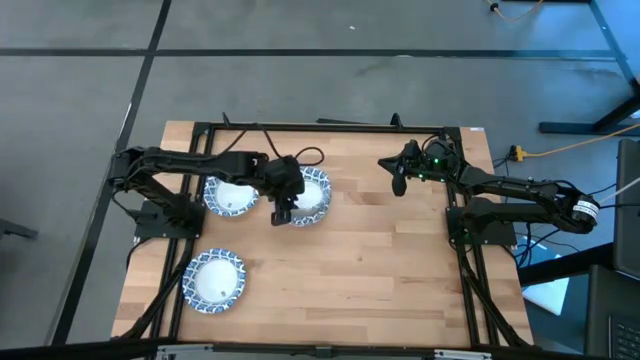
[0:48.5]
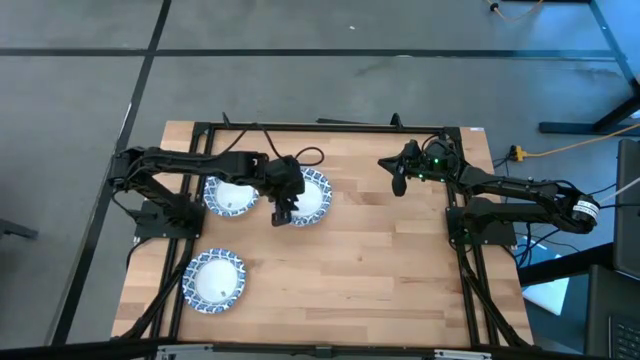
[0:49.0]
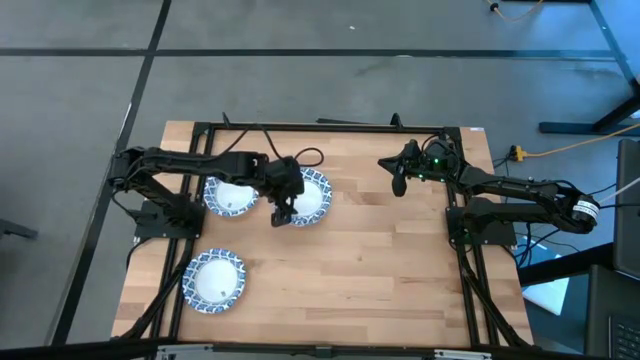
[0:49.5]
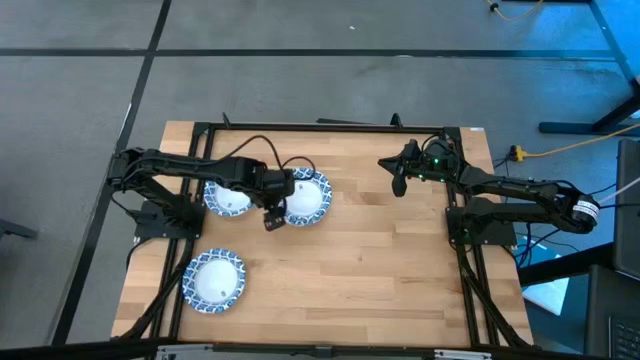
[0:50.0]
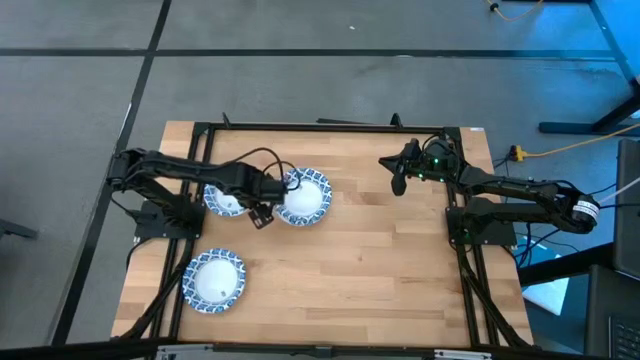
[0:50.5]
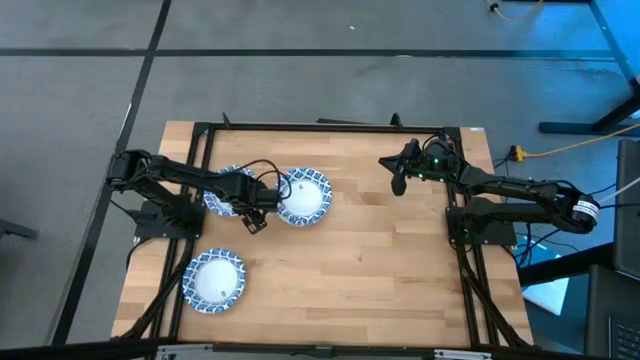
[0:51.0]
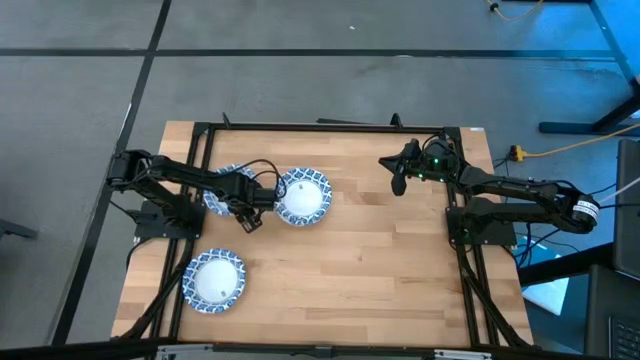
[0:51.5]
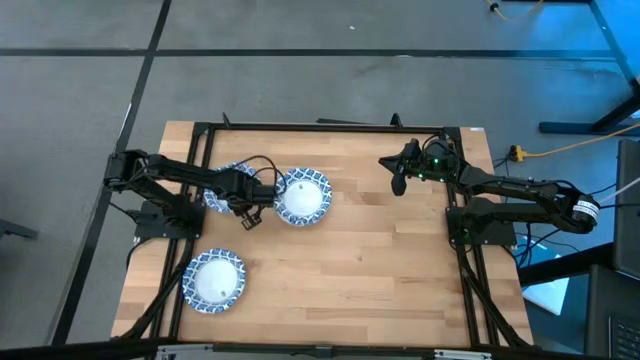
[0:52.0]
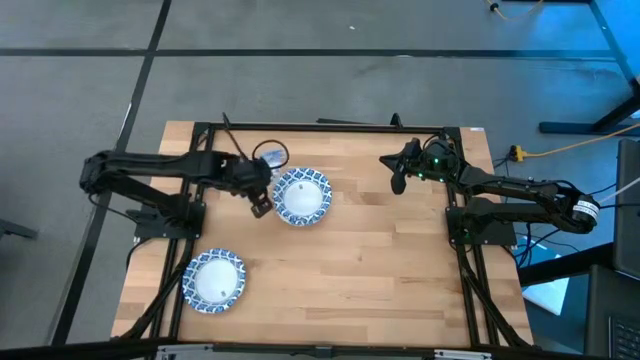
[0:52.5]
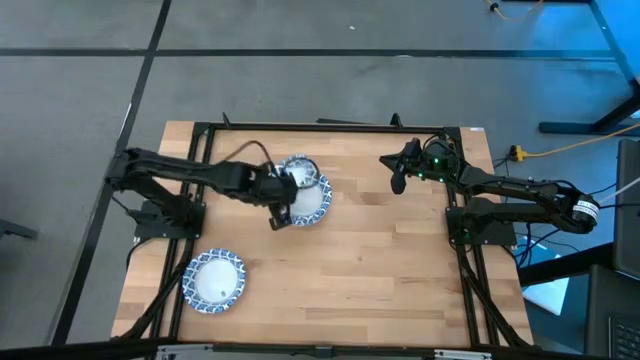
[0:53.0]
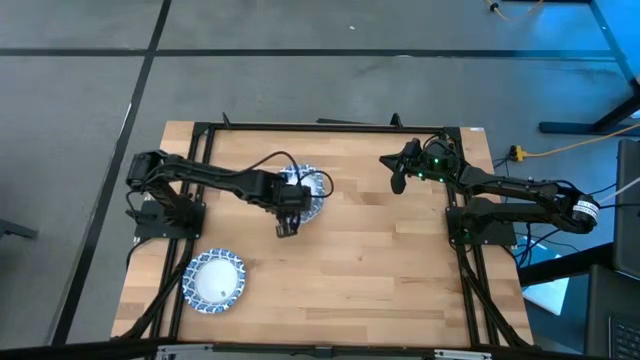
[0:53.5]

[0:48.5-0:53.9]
Task: Nest bowls inside each other
Stack the blue patterned bowl on the stacked blue patterned bowls

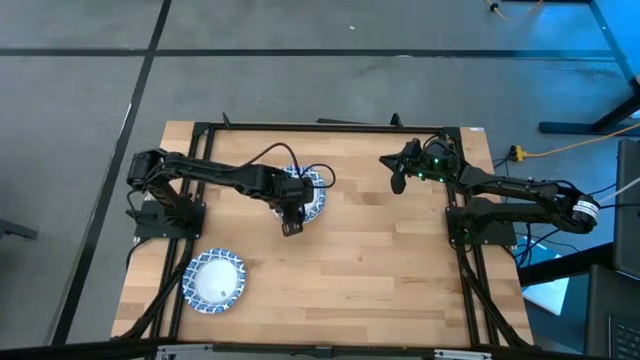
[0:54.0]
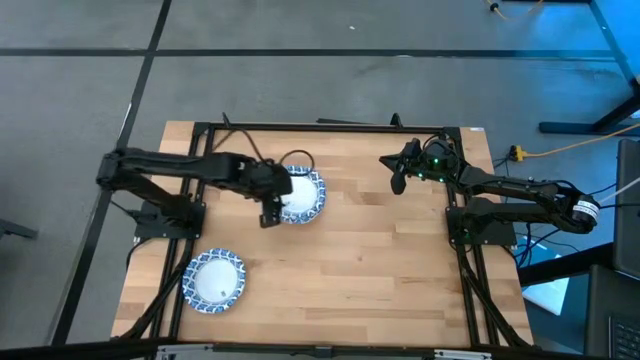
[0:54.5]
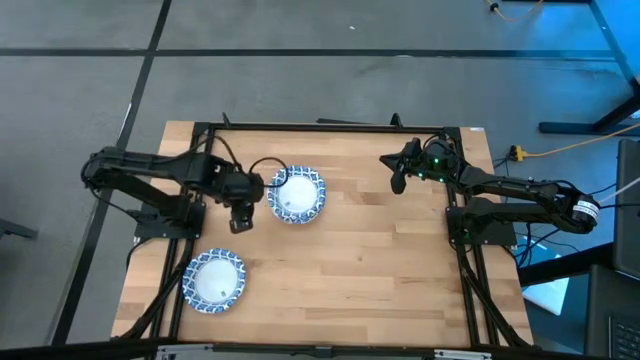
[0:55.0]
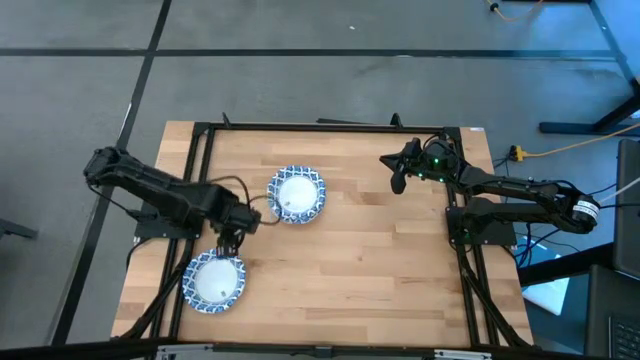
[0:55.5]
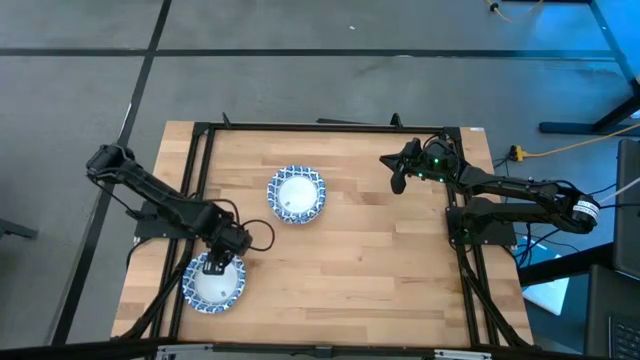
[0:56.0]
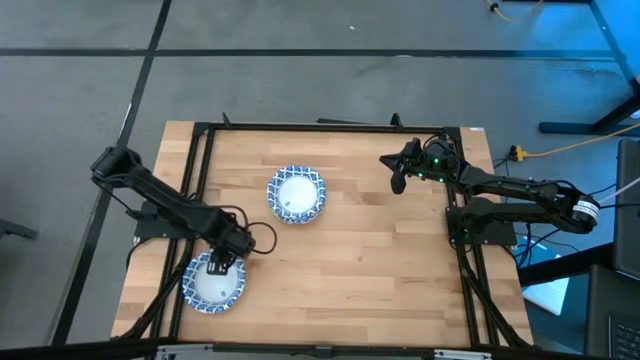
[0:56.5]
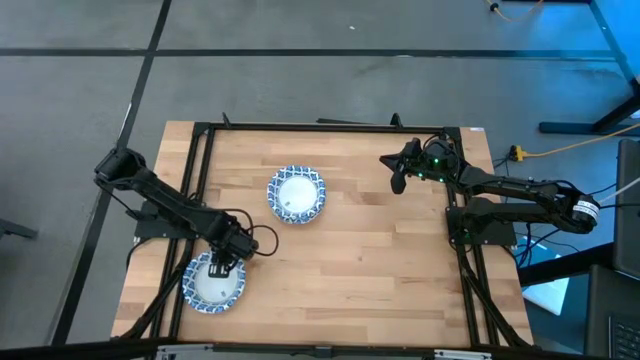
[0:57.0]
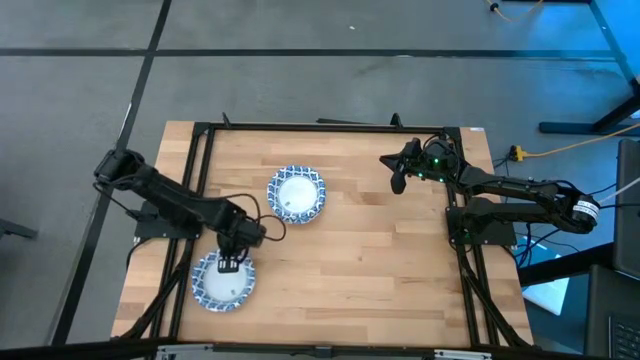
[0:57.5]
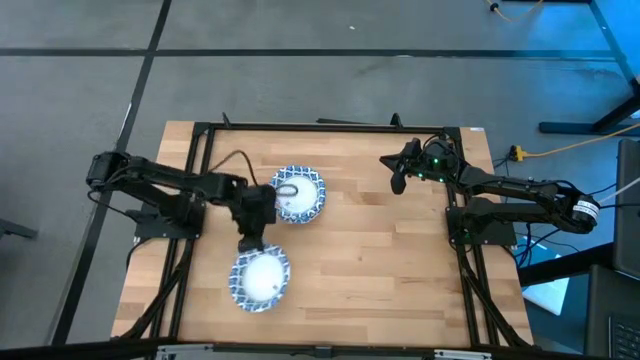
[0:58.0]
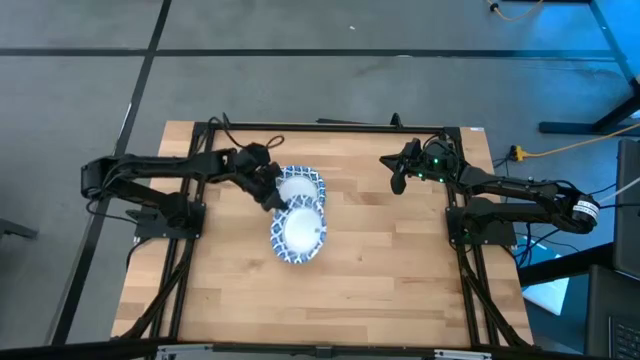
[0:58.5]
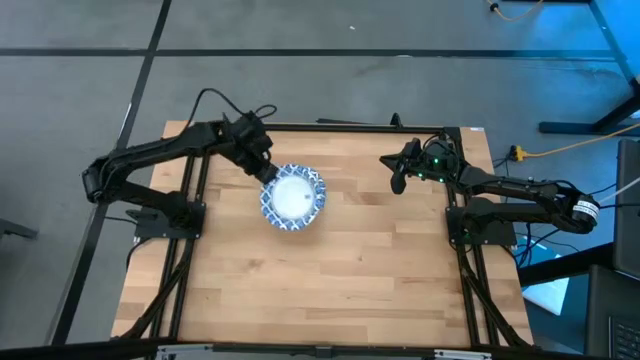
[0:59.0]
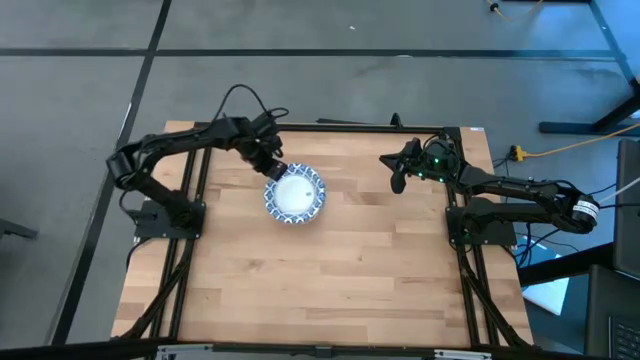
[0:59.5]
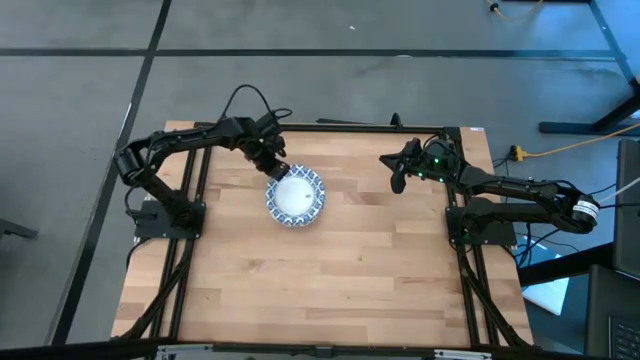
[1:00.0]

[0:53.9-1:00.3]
Stack the blue patterned bowl on the stacked blue patterned bowls

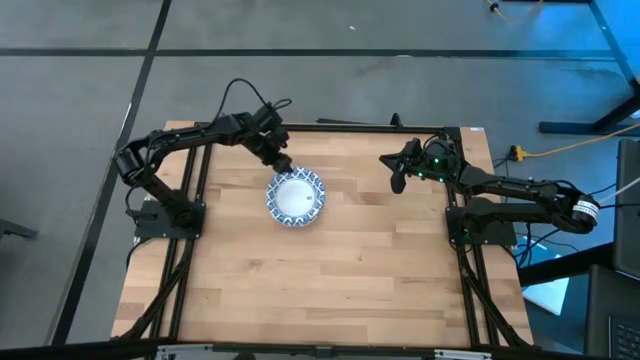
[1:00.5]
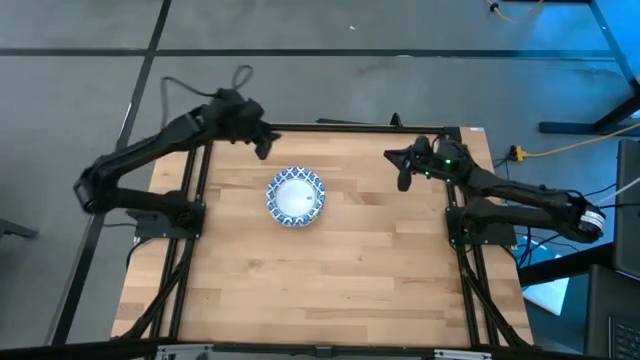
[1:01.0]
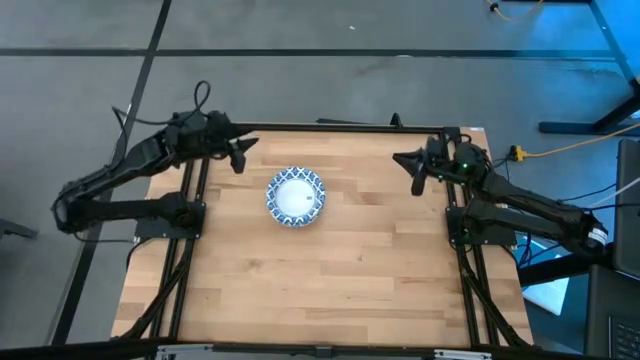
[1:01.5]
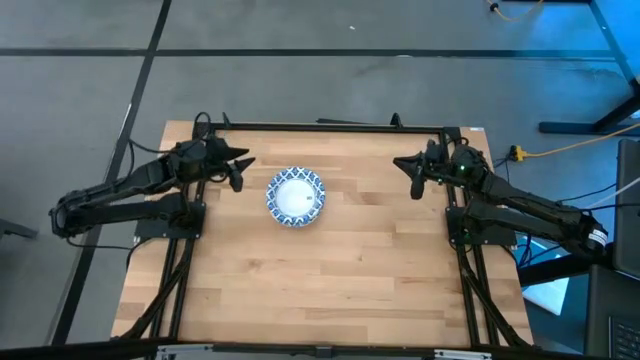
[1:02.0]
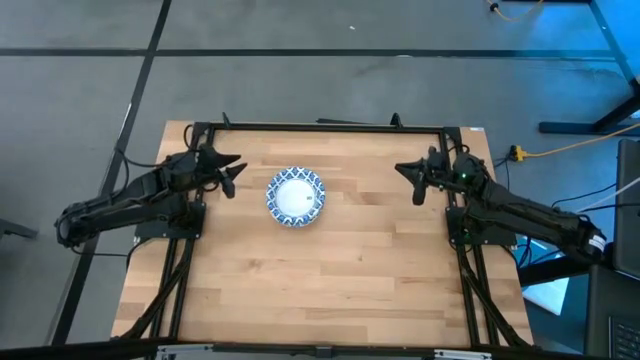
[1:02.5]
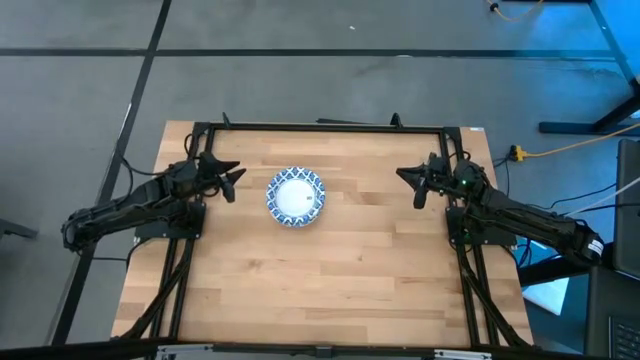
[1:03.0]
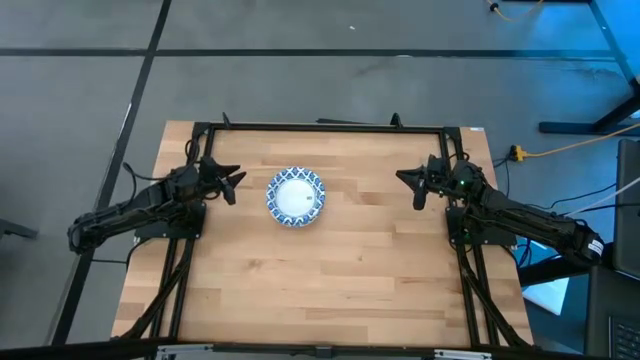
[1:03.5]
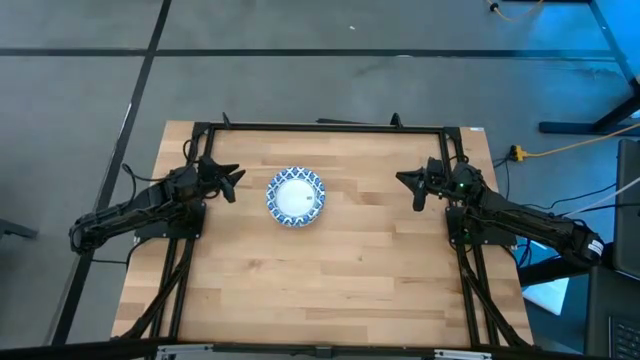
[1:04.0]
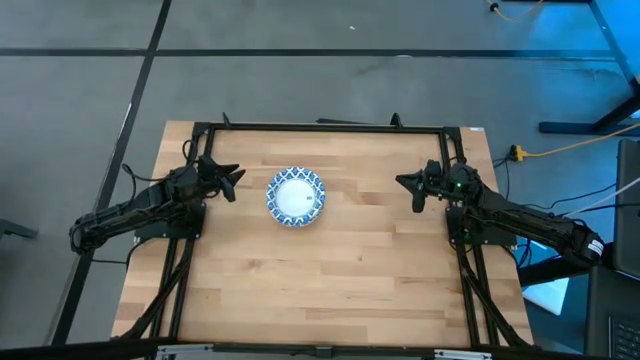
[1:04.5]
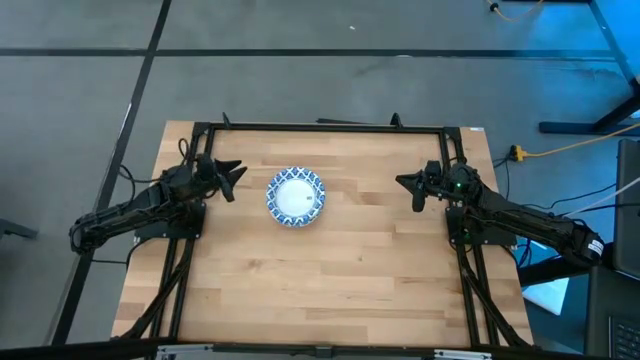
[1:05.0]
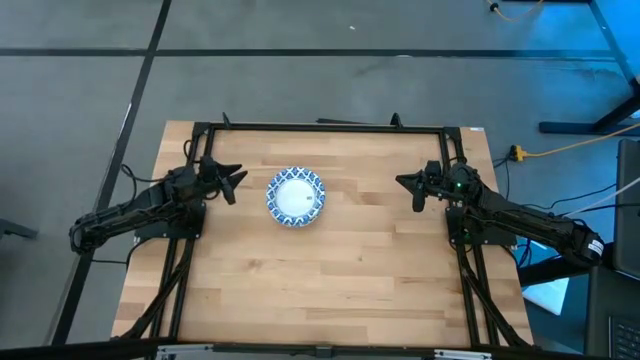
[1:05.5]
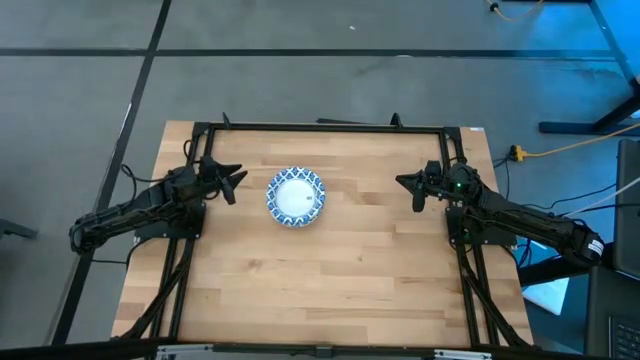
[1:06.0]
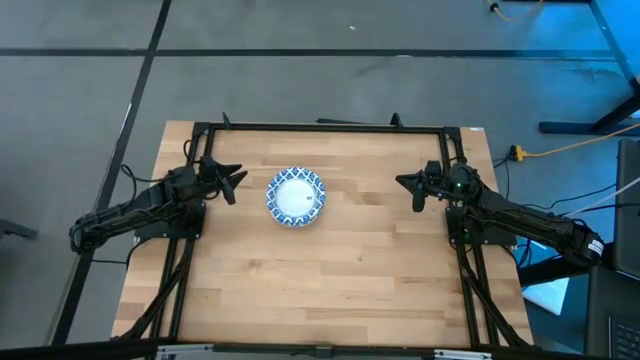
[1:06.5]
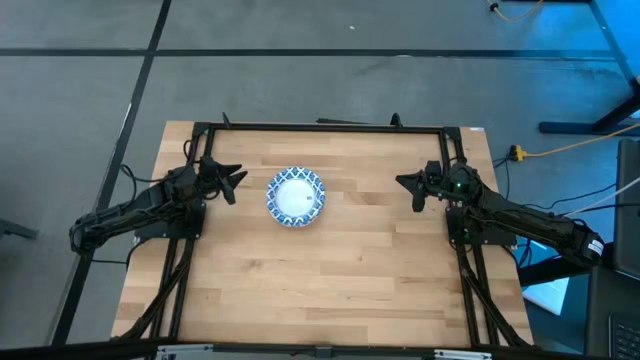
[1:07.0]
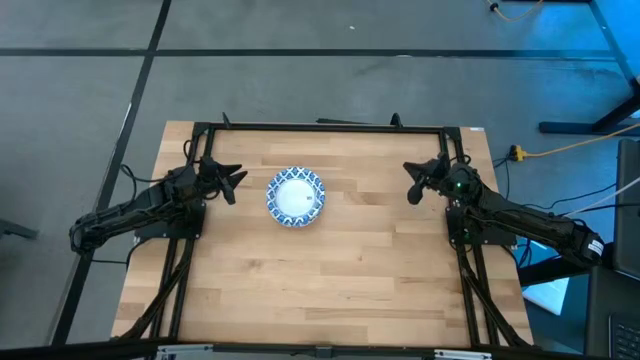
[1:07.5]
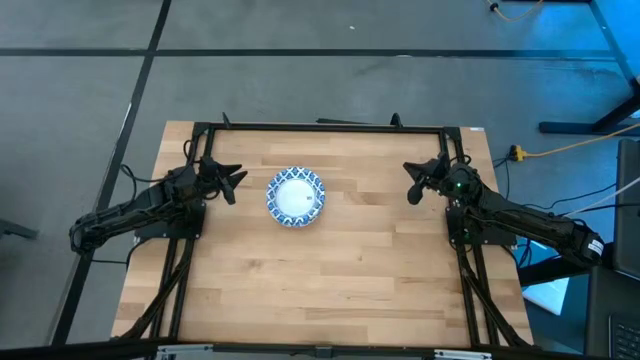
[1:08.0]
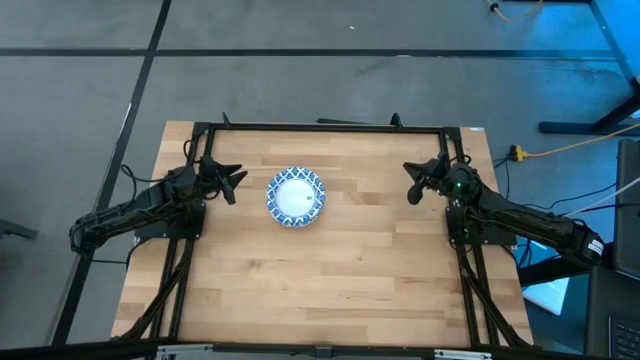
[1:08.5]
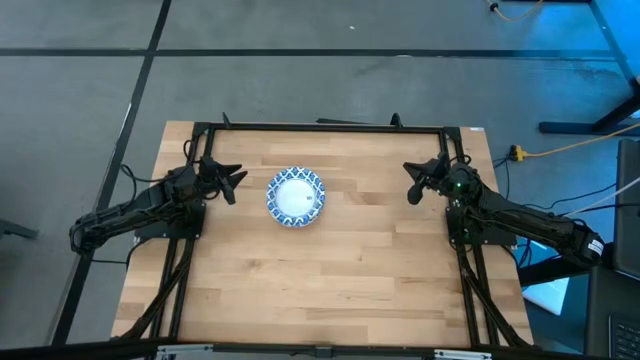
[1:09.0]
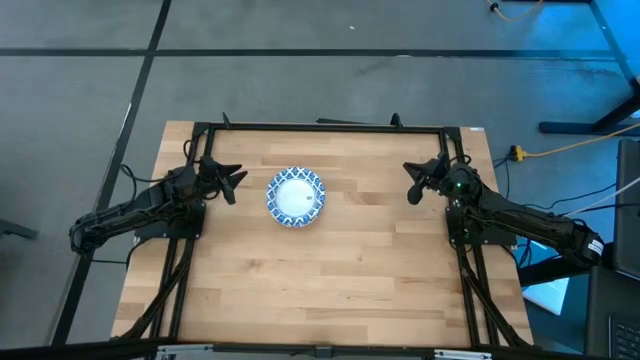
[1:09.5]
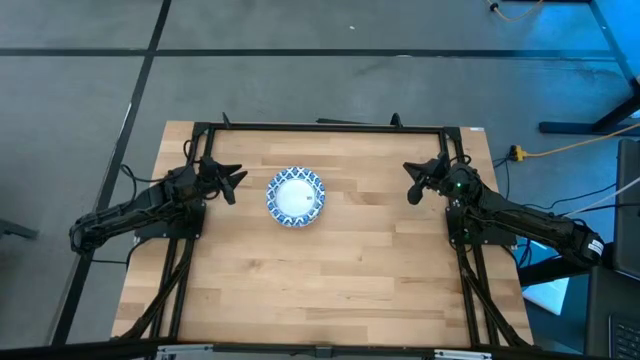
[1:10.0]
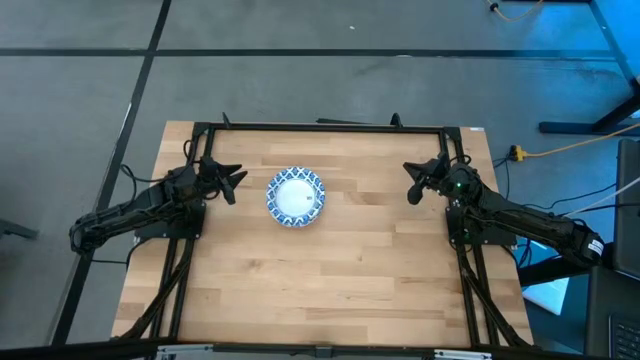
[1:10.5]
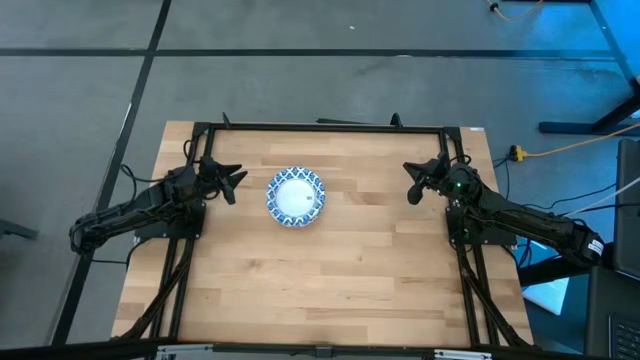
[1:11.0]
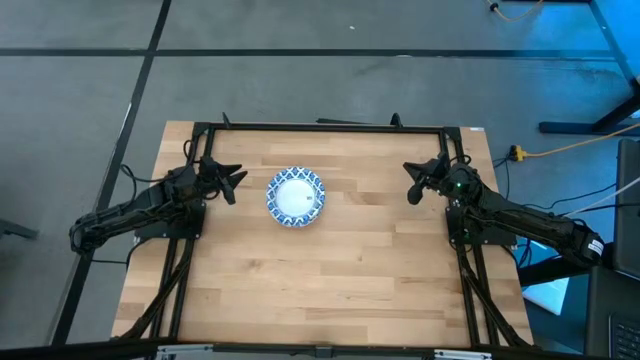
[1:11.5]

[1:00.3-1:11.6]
Return to Home Position
